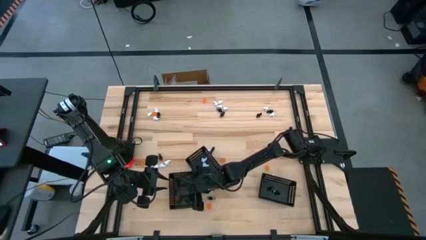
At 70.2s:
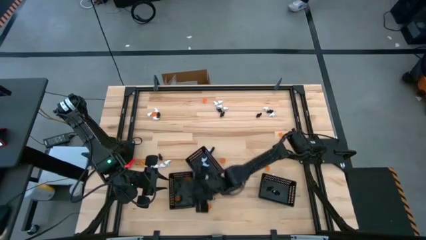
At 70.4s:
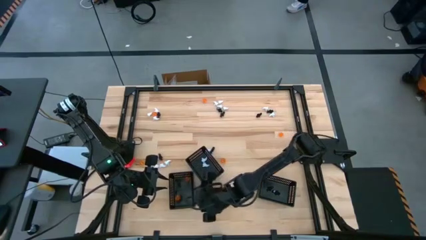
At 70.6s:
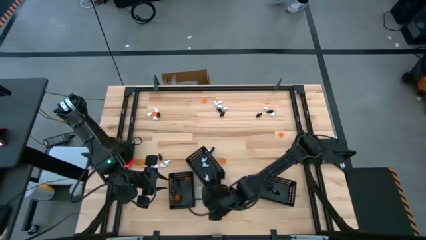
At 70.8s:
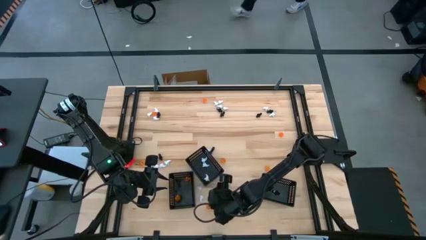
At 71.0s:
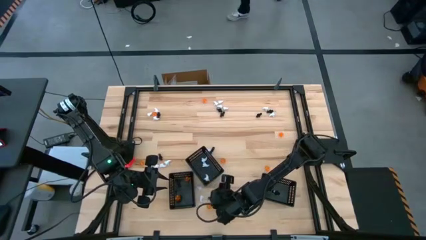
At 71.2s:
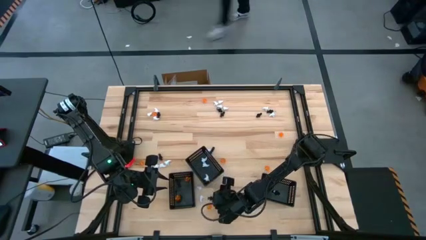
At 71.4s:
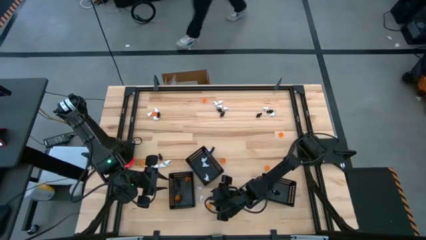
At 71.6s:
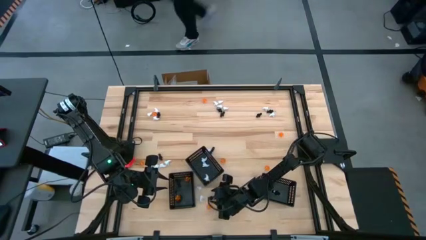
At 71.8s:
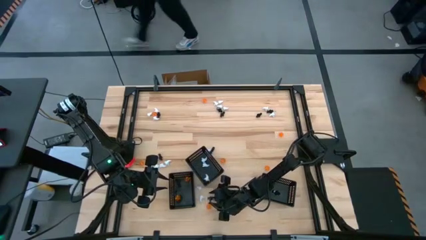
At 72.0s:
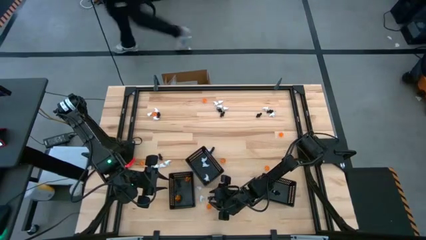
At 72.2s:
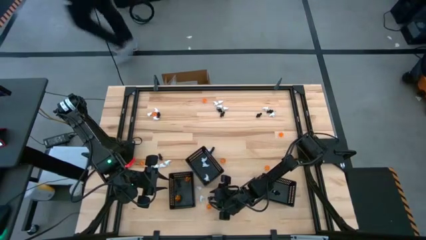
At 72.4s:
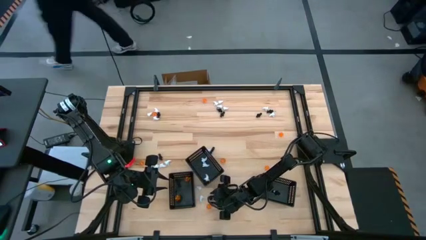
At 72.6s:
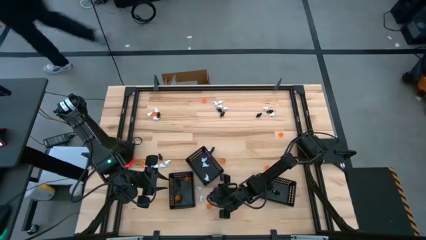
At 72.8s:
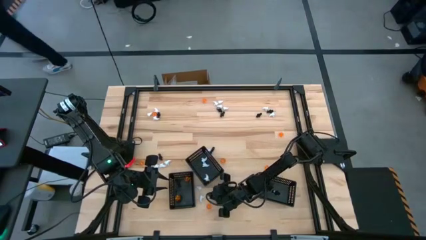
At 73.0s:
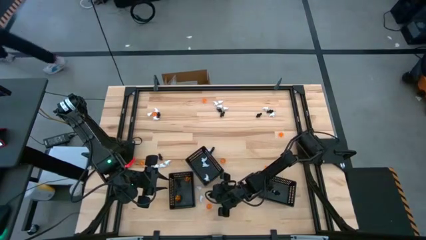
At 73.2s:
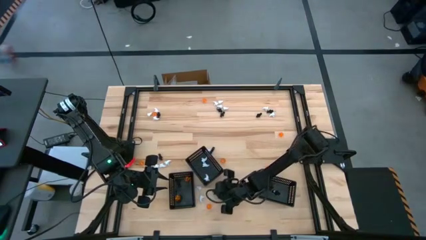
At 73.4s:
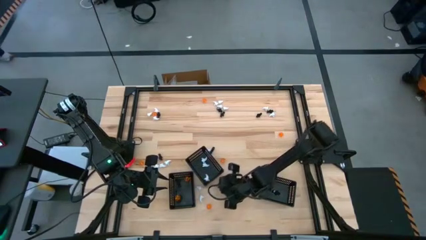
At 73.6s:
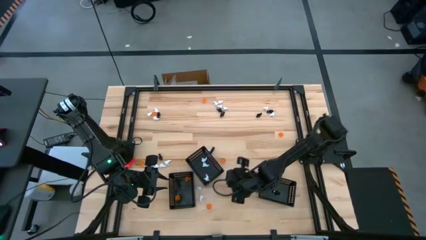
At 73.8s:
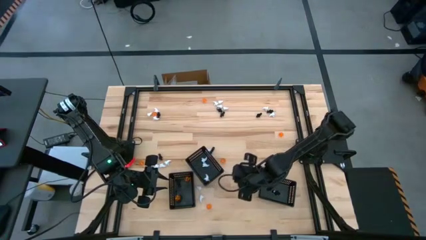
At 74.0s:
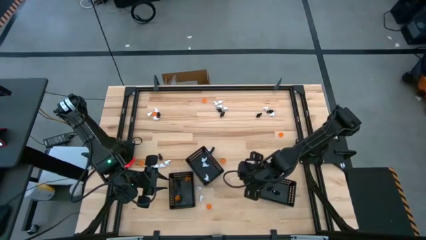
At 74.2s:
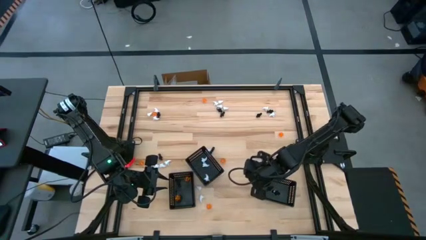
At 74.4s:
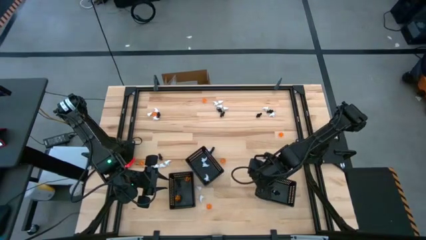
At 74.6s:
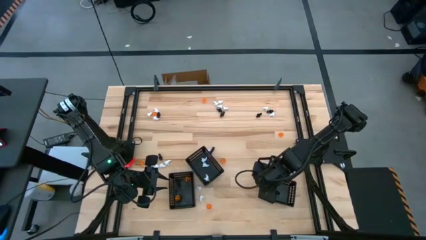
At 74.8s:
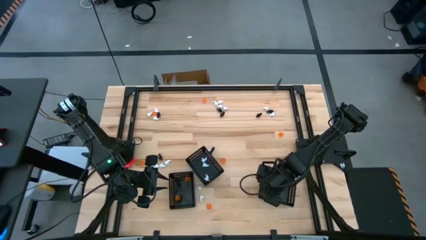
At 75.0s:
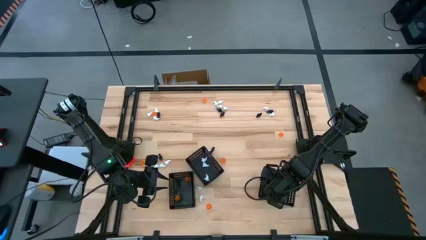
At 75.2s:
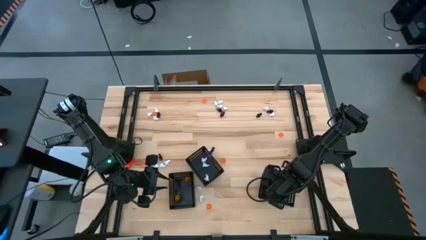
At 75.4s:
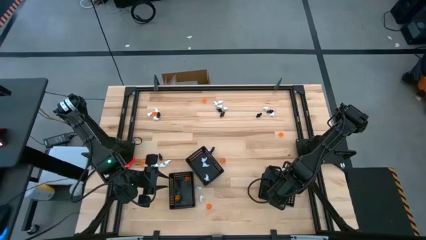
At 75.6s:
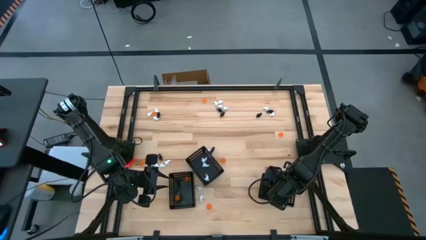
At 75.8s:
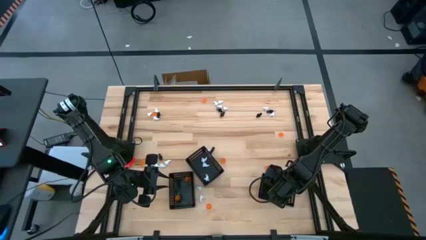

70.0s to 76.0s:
Task: Sort Halloween decoration
Put the black skeleton toy into the right black basket

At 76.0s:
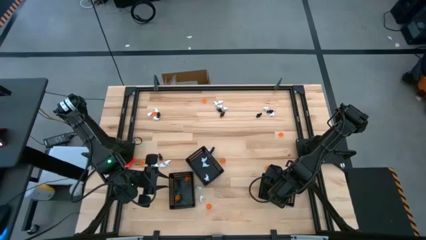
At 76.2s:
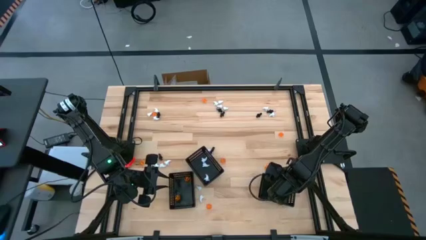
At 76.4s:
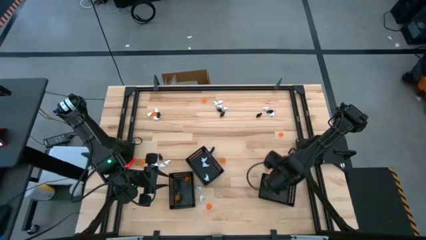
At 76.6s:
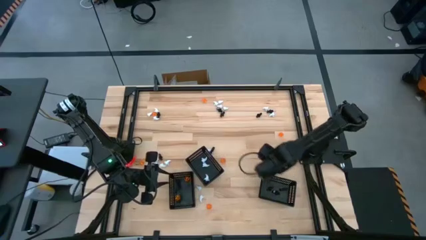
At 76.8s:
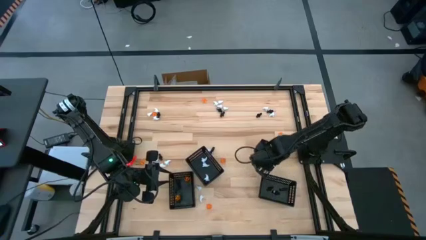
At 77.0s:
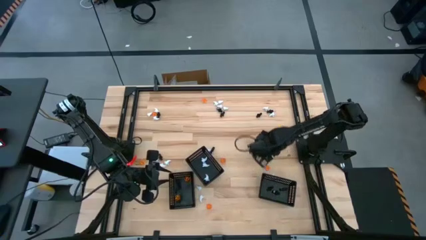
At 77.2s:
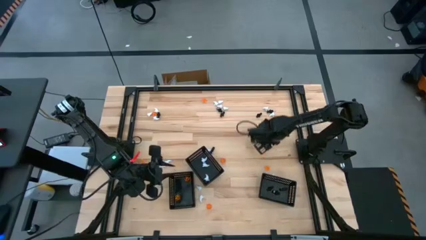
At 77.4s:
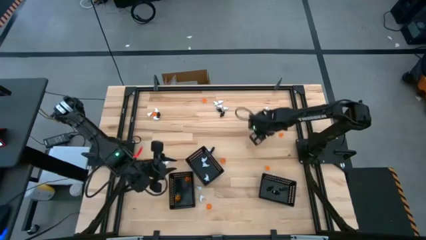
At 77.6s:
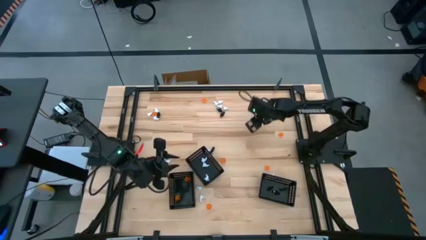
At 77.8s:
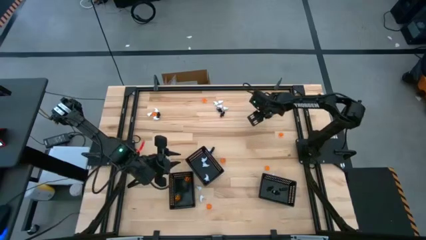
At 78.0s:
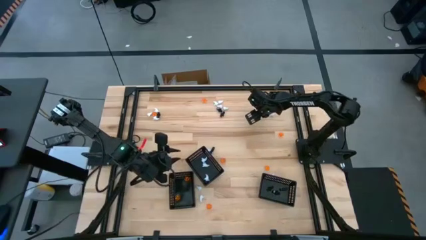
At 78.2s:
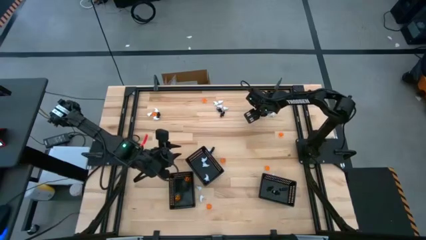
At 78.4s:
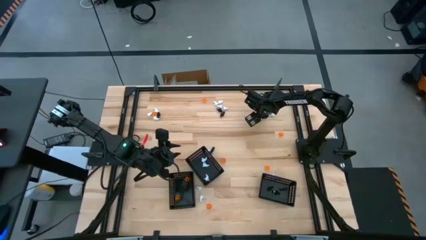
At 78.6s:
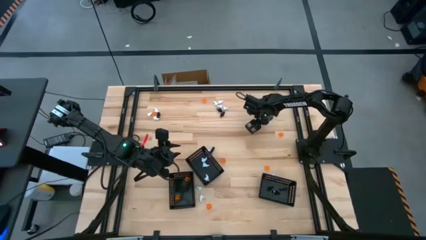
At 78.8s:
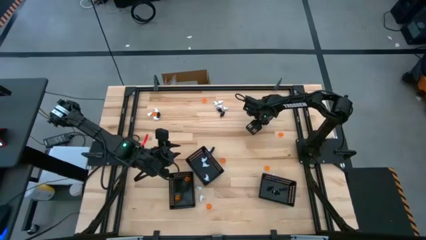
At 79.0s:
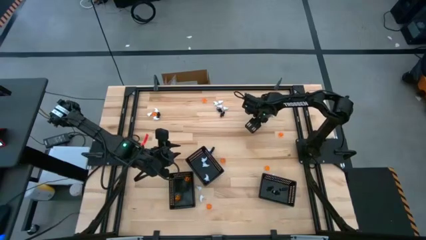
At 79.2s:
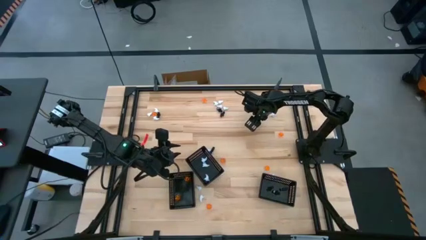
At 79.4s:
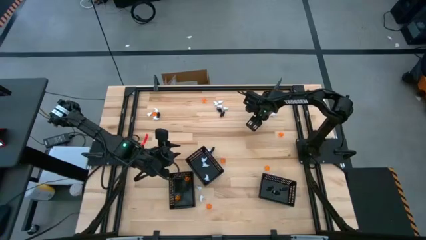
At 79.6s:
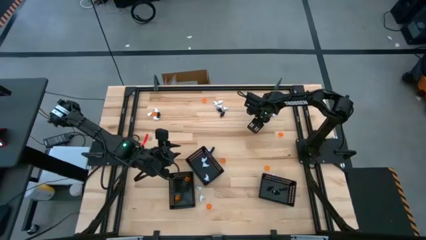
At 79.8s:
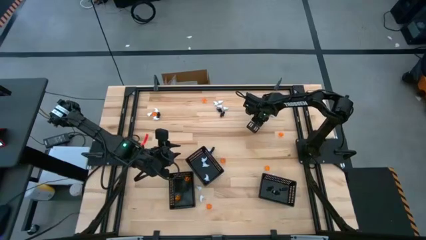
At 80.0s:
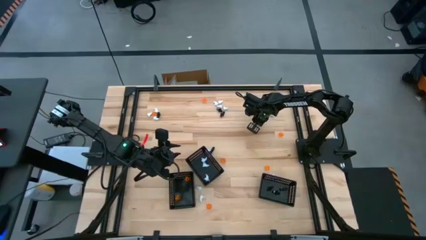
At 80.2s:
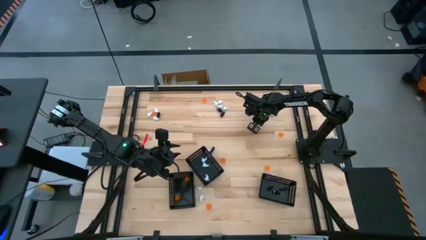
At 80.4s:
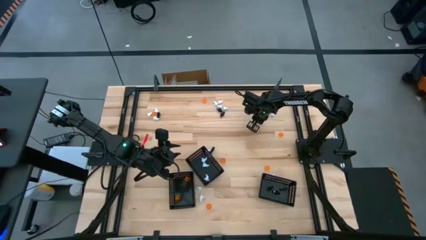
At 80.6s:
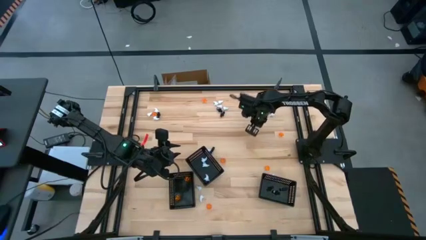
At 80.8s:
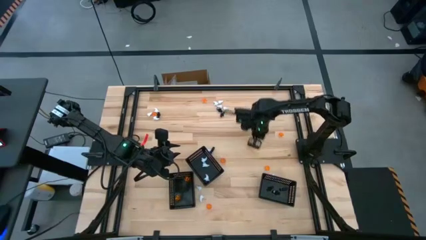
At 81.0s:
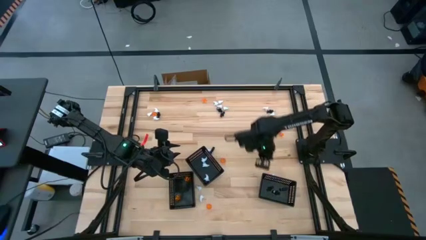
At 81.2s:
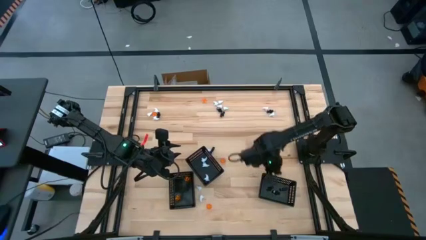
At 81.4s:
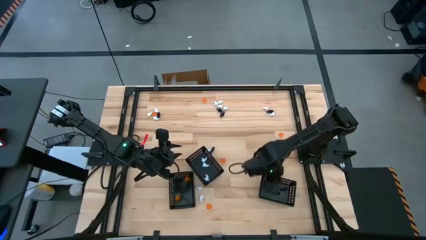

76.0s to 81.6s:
Put the black skeleton toy into the right black basket

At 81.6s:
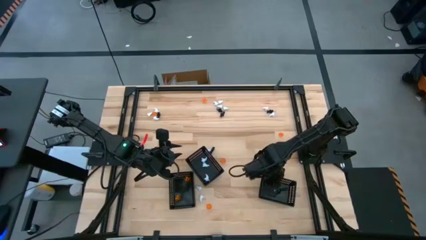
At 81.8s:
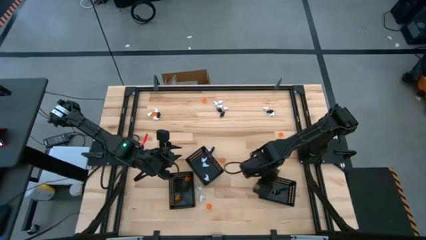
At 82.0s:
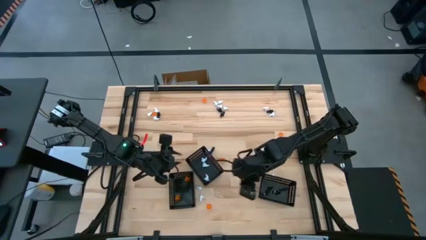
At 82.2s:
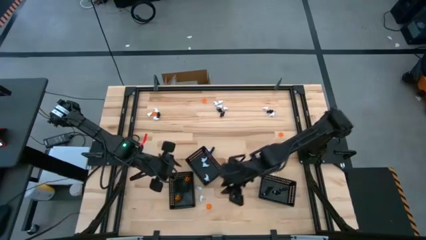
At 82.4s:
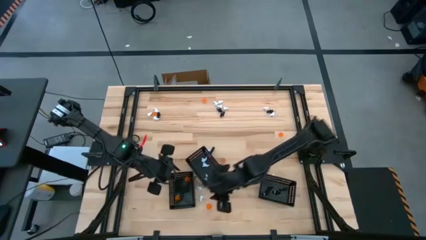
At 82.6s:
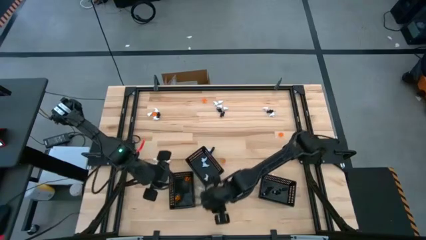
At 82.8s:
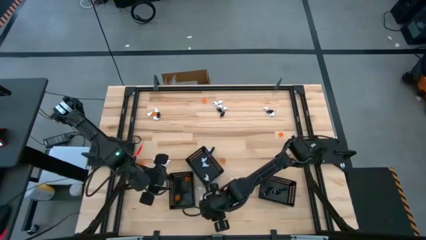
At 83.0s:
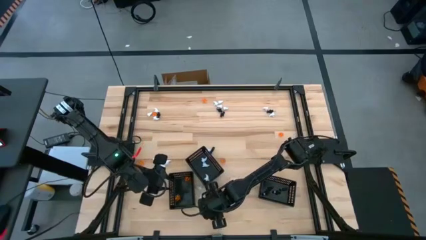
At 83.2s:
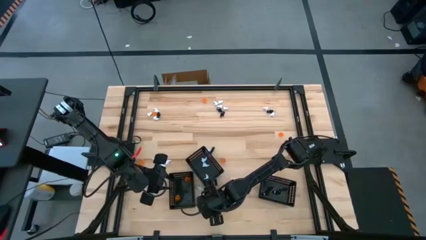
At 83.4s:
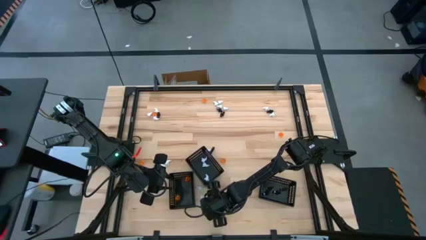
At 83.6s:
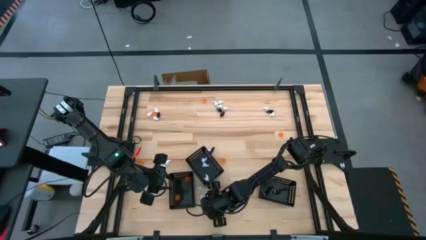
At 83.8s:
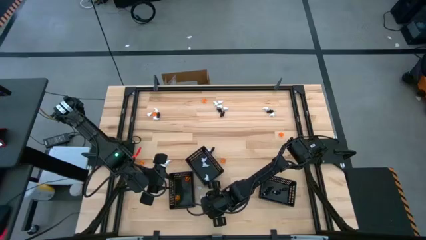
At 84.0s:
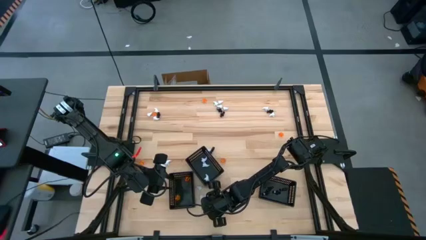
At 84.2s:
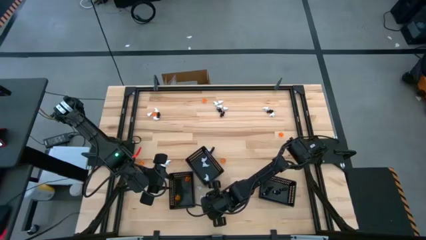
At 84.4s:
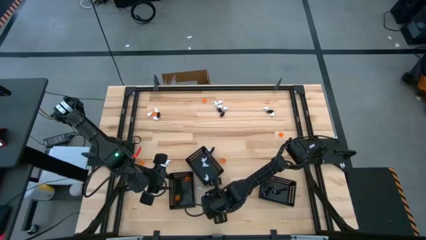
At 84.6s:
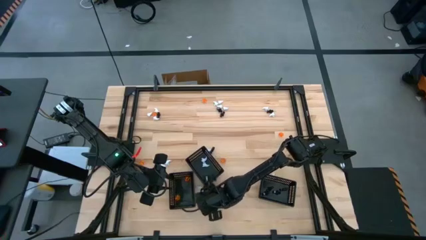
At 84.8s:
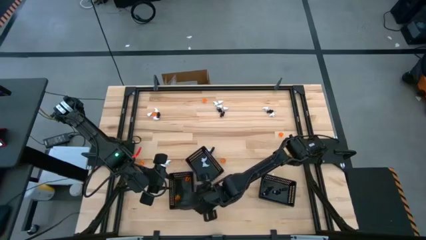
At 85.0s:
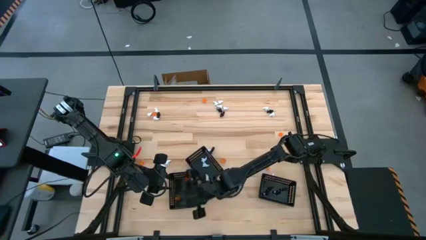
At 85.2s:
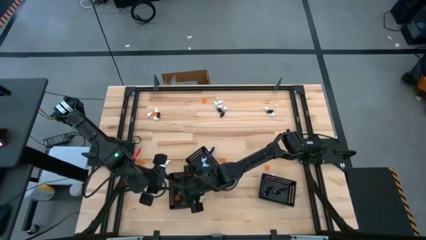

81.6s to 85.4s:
Put the orange pumpkin toy into the left black basket
